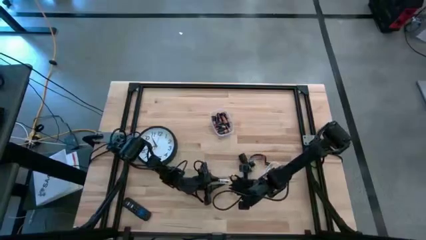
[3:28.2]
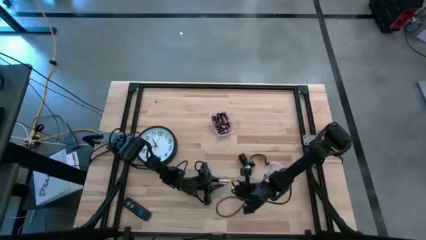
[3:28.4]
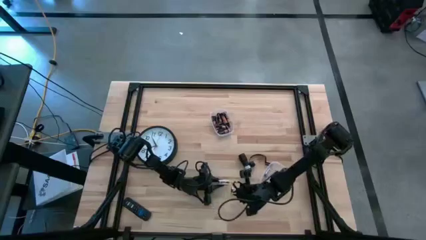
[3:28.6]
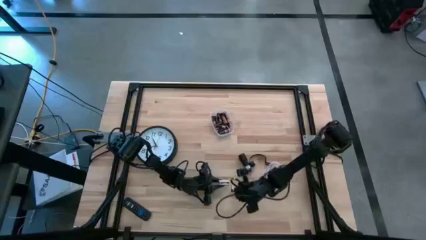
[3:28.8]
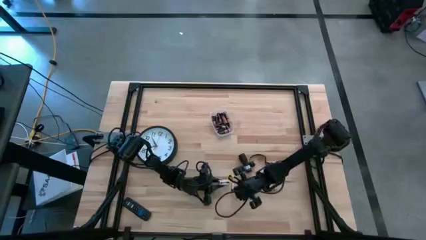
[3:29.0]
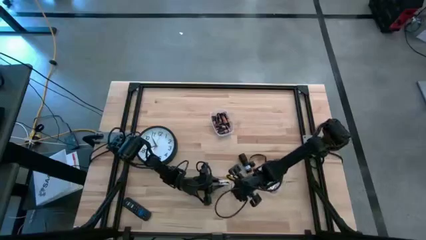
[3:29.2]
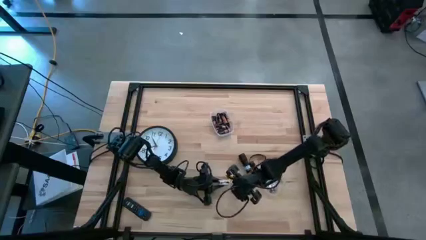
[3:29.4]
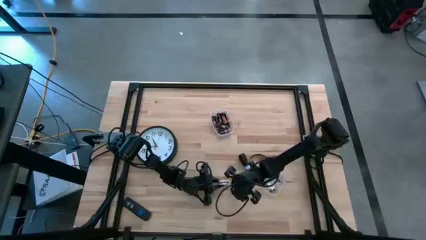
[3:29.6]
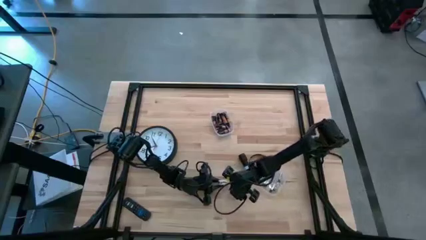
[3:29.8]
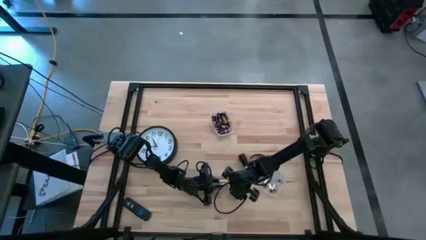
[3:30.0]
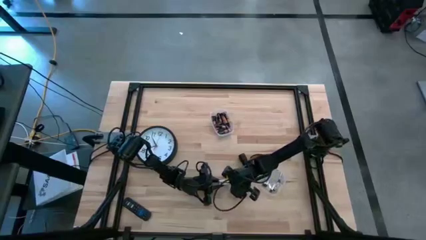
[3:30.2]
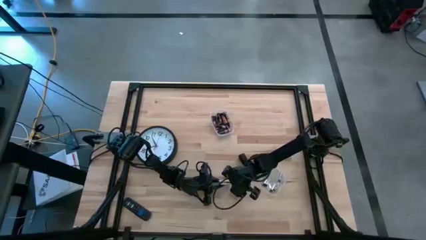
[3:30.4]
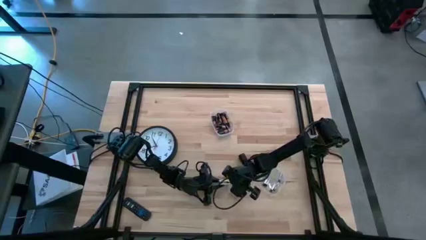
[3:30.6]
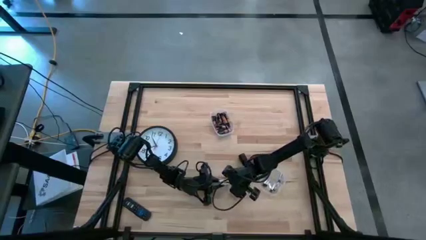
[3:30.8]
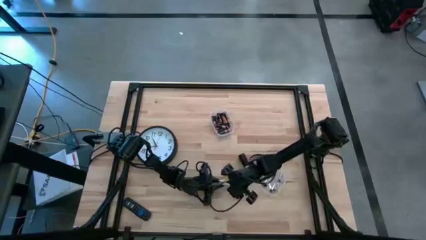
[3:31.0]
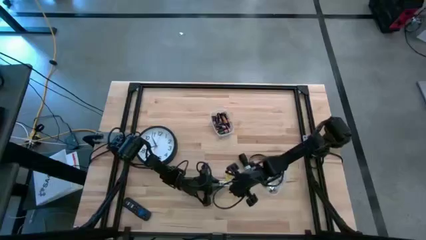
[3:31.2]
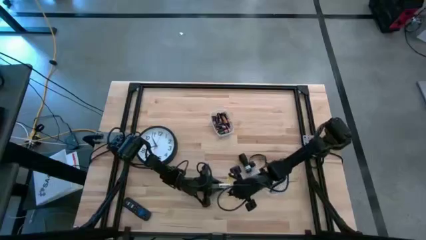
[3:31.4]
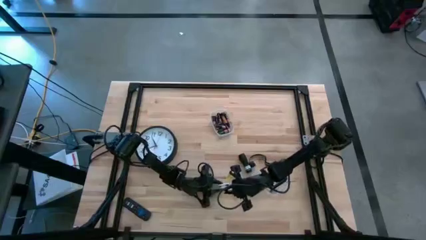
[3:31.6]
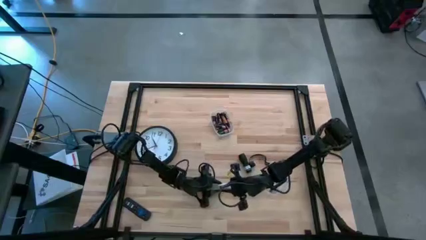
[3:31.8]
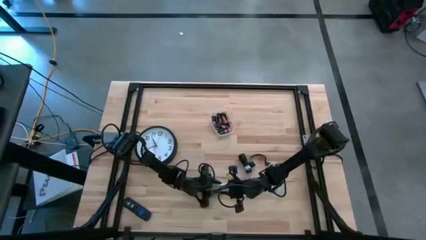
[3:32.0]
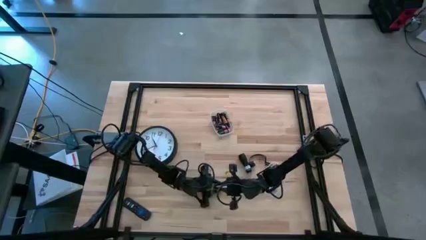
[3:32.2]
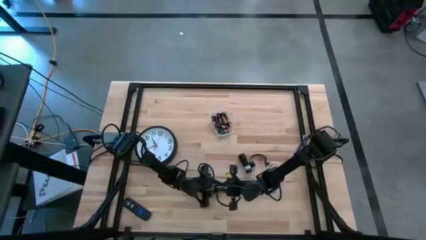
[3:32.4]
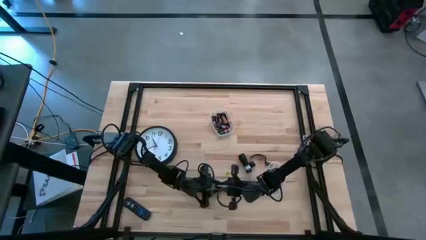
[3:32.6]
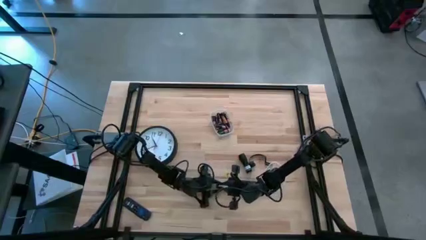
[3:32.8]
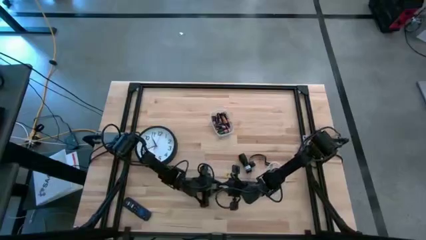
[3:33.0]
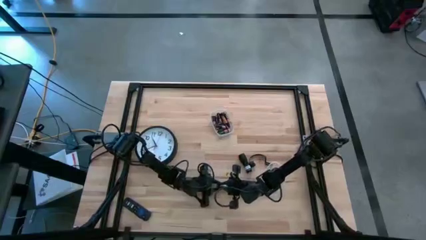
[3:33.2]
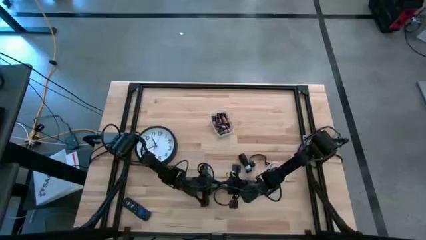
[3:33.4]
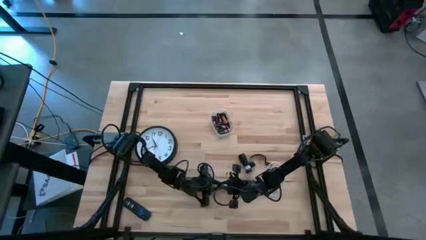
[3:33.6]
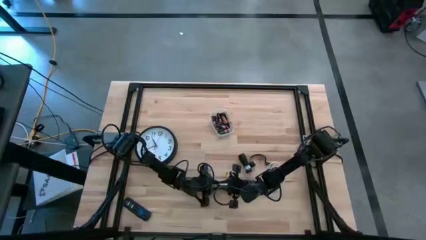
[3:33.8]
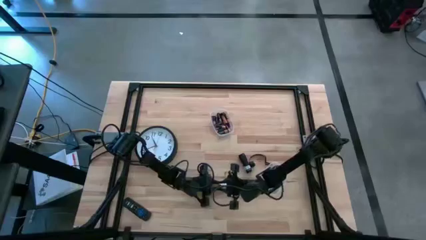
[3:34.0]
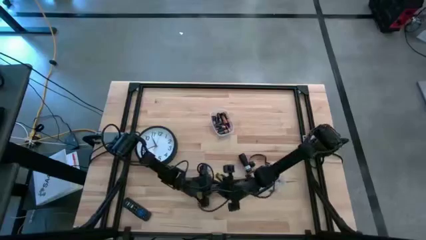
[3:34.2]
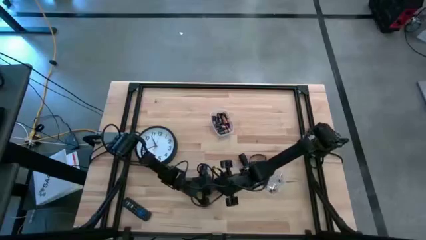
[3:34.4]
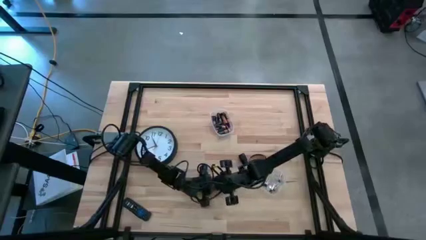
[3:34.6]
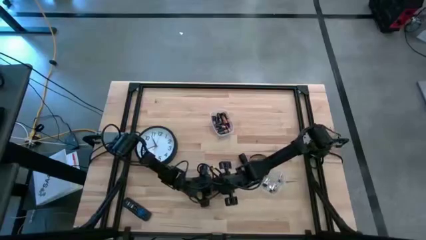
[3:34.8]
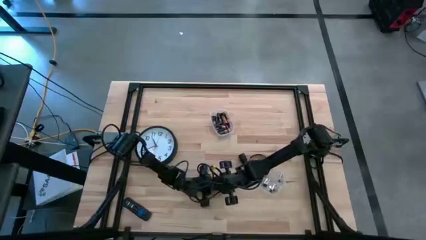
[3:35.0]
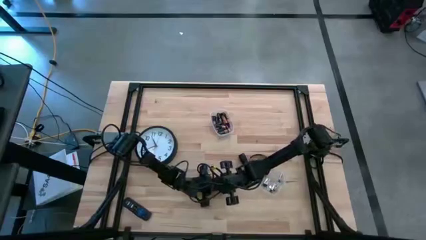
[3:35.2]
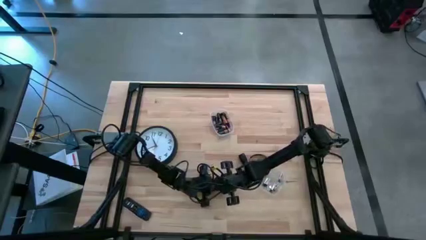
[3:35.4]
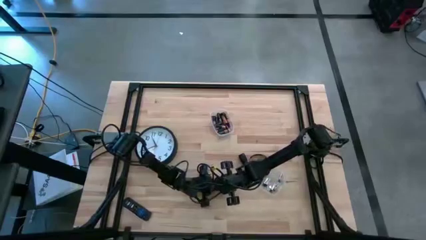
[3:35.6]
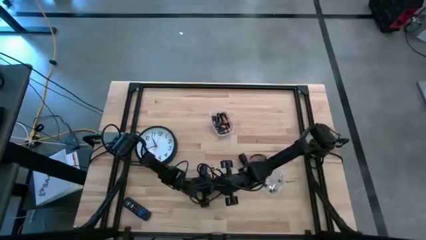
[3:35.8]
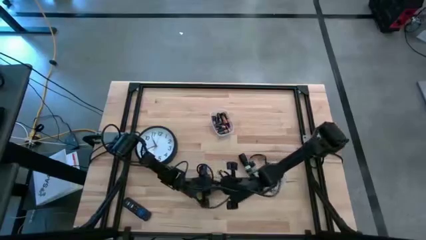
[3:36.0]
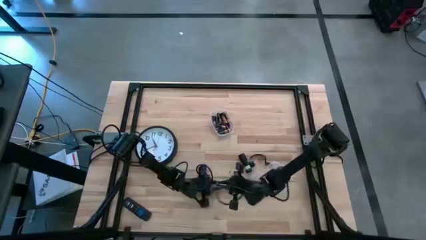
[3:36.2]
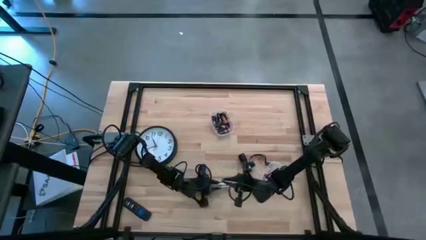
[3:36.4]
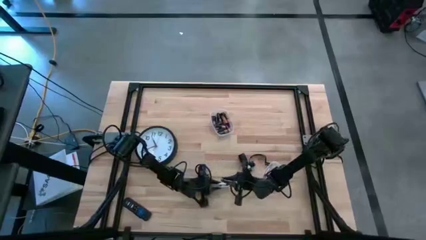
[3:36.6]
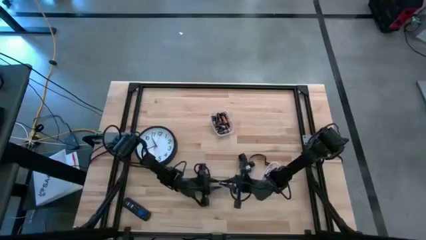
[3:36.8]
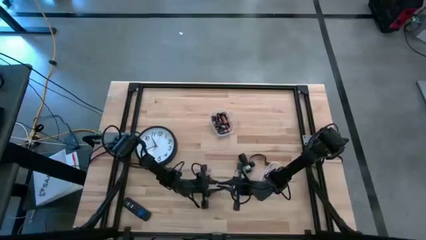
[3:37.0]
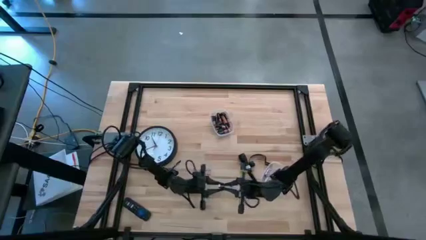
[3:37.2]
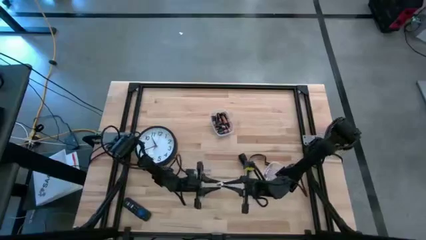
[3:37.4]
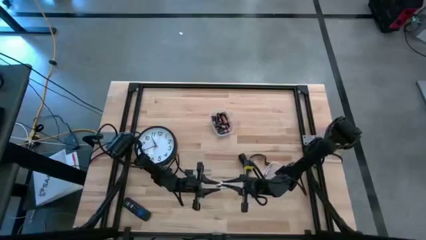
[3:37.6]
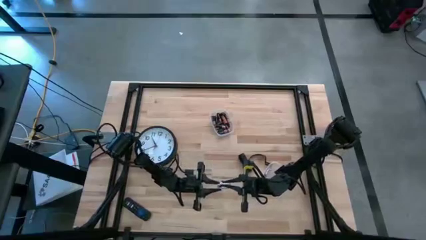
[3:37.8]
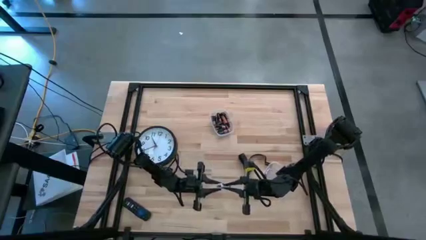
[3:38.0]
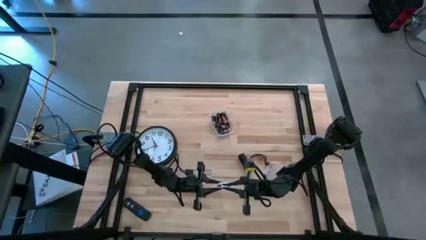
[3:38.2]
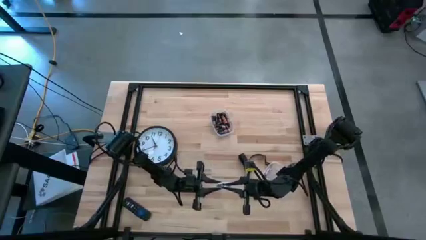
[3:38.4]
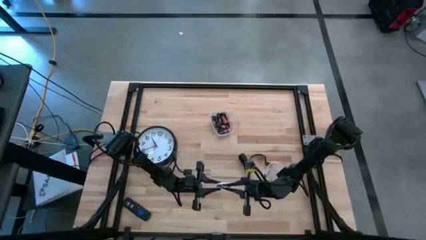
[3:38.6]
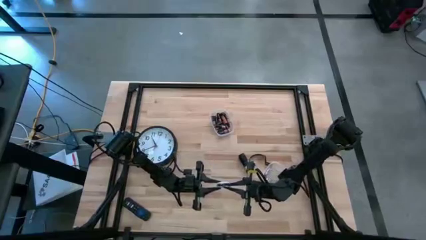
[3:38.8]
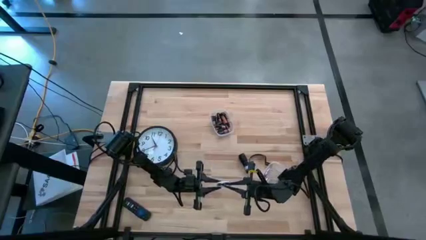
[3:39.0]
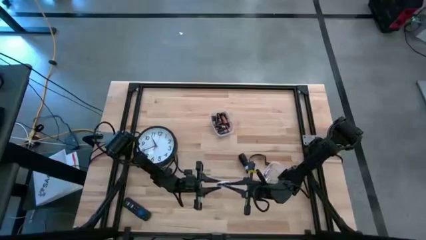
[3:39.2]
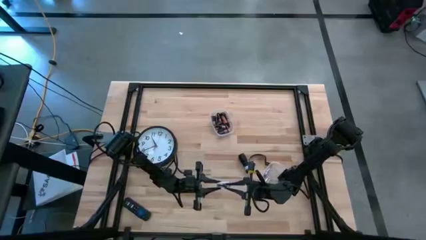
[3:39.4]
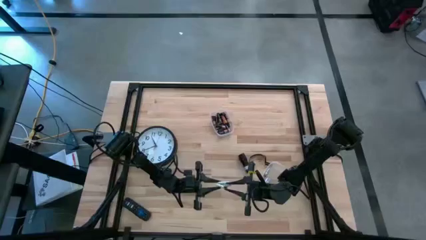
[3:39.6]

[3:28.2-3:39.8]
Task: Insert battery
Insert the silver battery into the battery holder

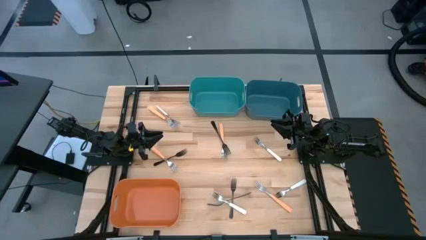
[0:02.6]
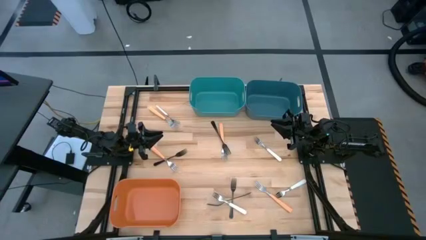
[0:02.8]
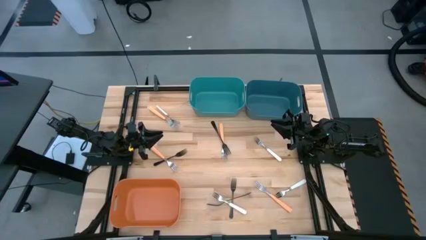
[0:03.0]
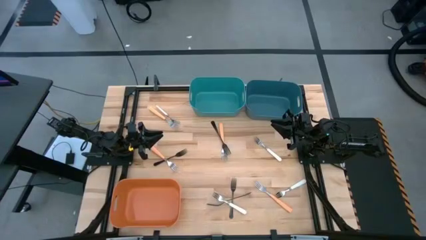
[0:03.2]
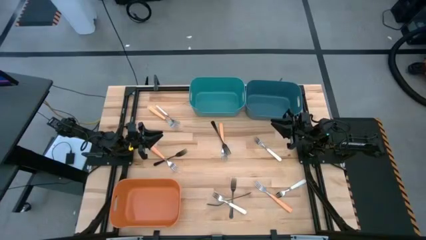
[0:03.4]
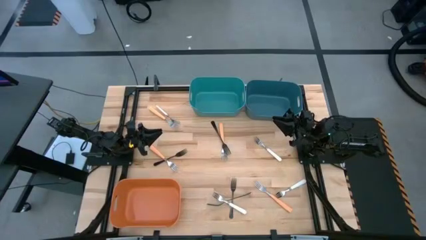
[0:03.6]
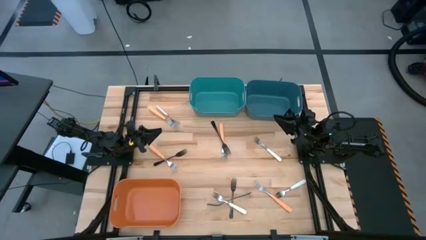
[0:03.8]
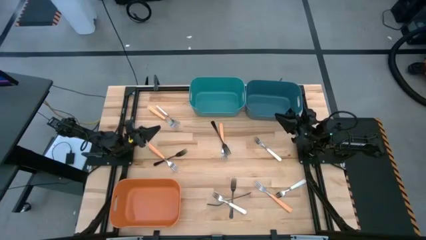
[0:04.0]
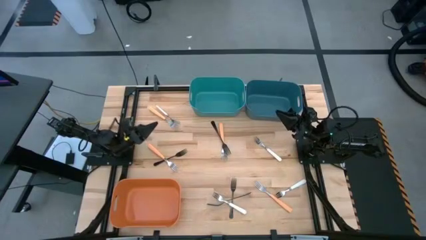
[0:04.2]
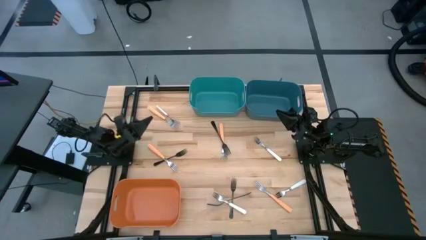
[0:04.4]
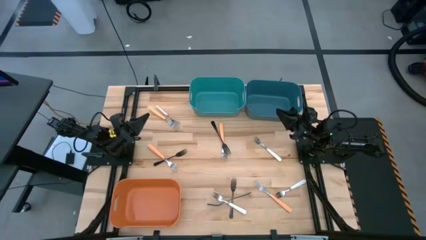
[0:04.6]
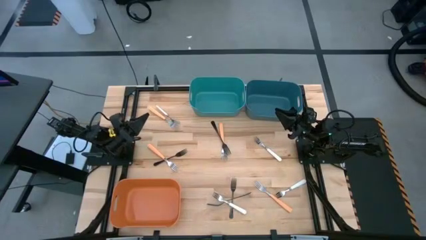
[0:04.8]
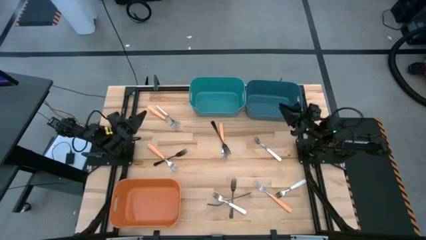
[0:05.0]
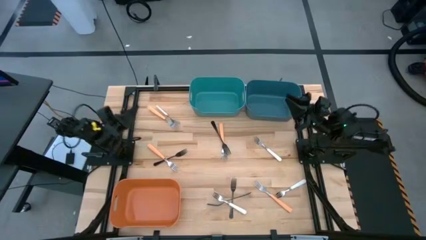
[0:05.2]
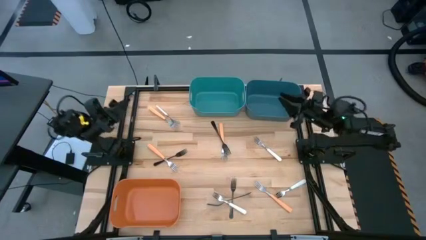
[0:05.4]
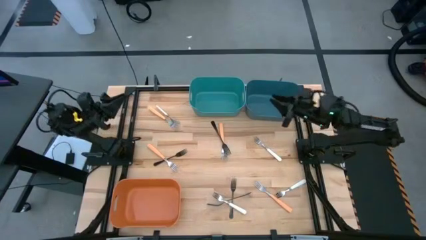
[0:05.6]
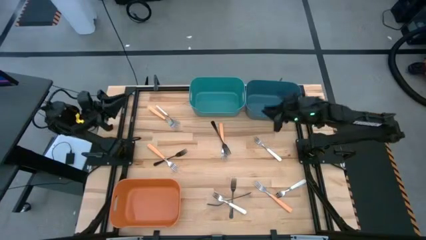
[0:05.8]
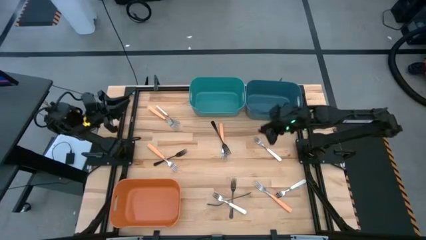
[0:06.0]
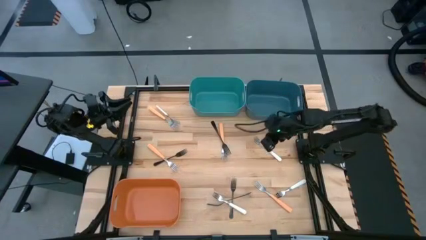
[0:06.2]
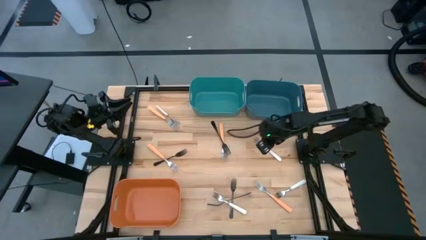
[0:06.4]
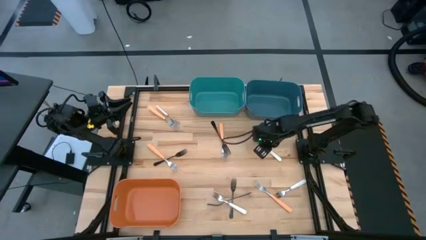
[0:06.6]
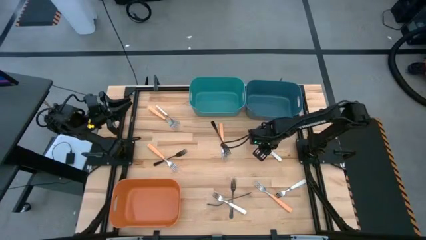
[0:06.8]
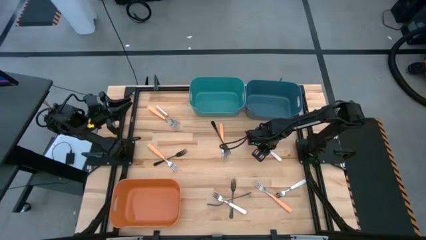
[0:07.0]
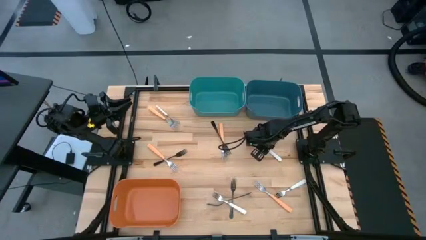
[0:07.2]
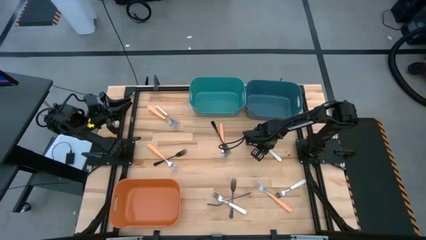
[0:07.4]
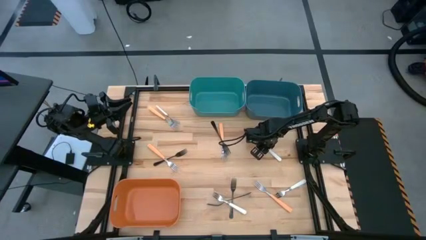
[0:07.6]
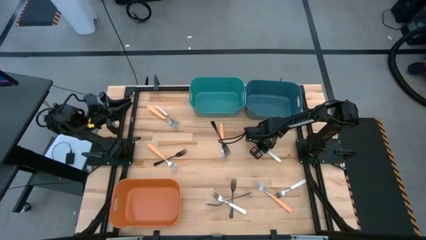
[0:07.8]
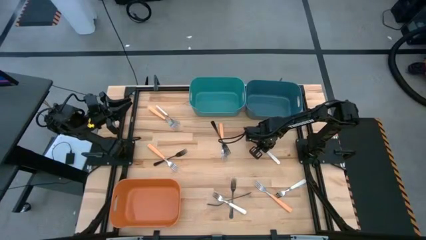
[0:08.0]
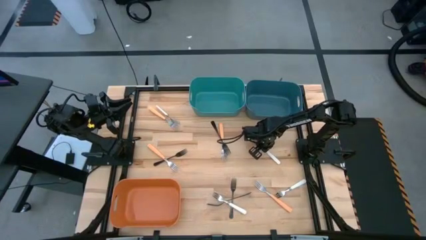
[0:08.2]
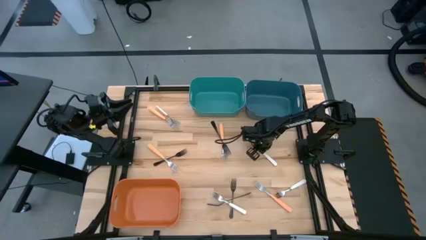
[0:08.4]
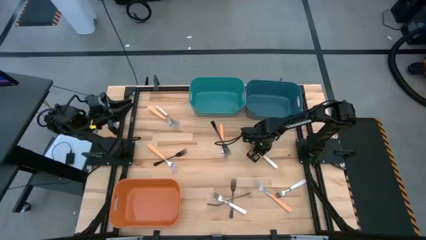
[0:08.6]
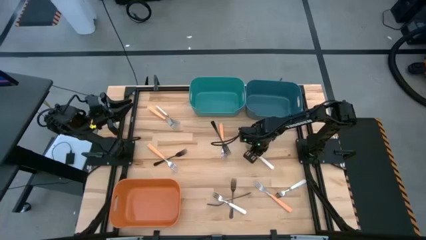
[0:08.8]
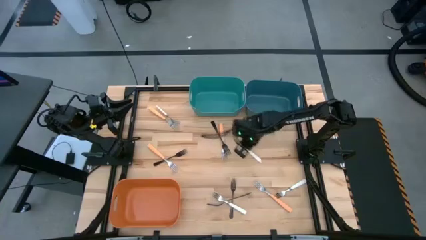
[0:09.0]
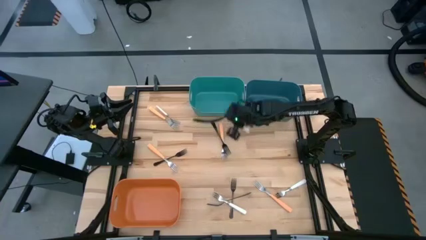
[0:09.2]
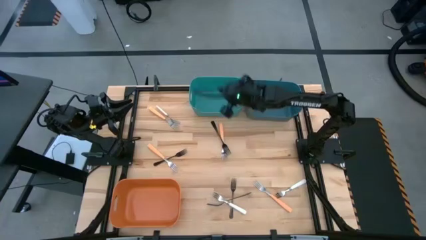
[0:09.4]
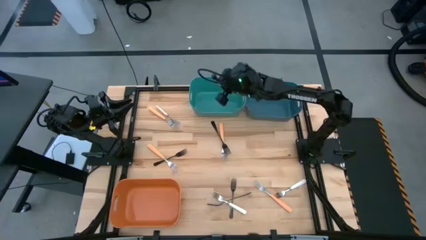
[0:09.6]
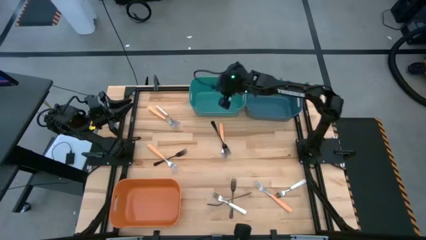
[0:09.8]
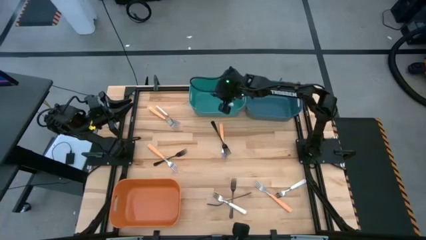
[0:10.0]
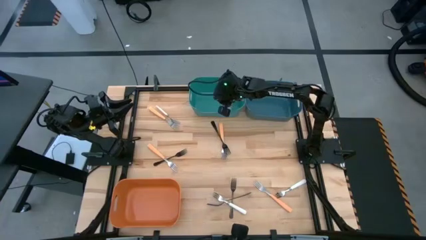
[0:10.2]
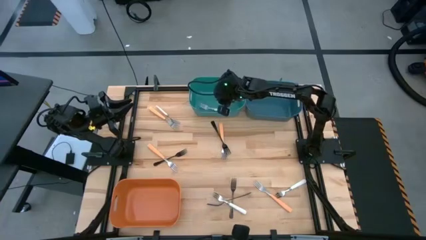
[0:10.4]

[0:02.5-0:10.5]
Task: Sort silverware by color (type)
Put the top right white fork into the green bin
